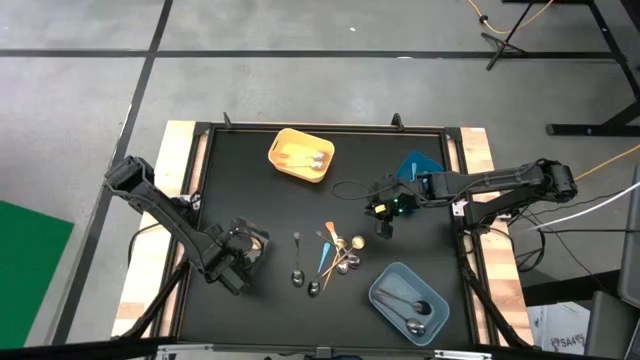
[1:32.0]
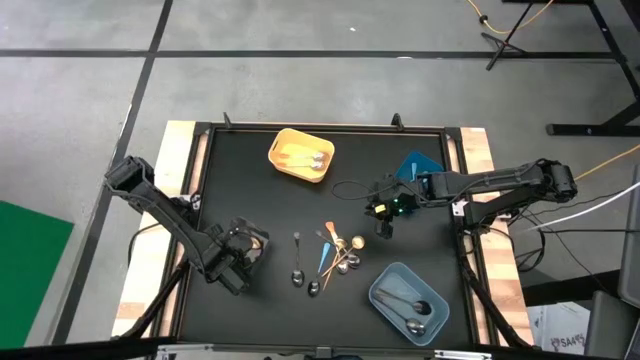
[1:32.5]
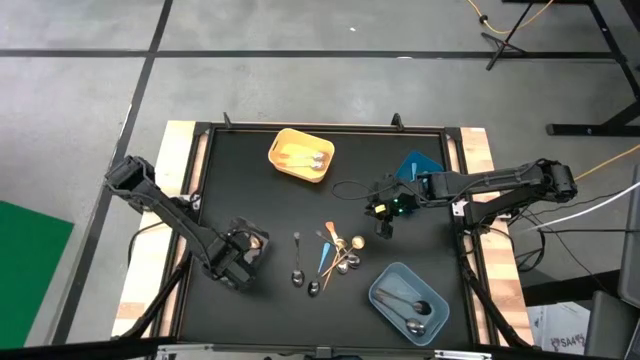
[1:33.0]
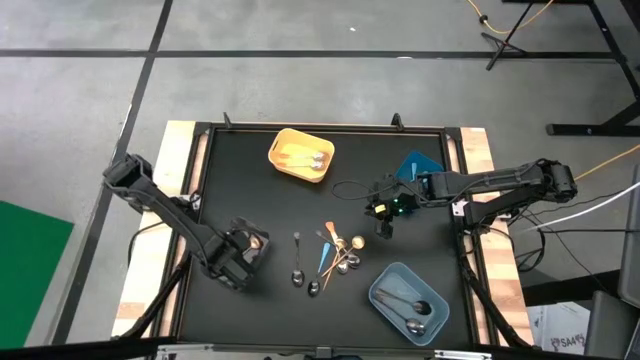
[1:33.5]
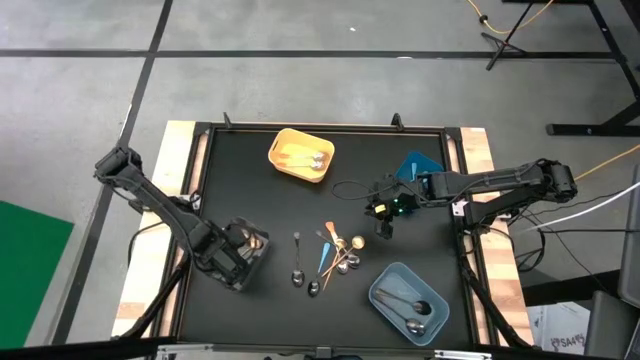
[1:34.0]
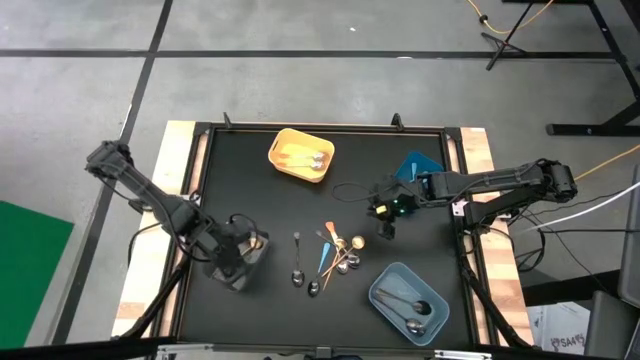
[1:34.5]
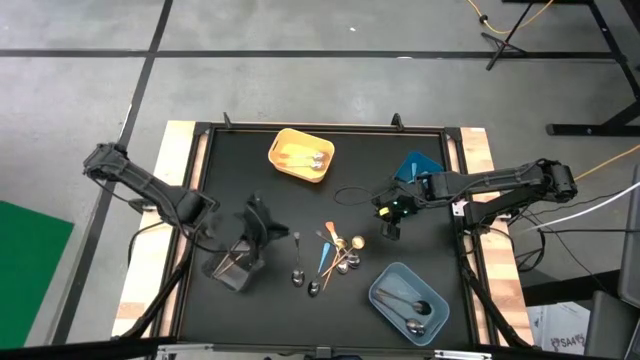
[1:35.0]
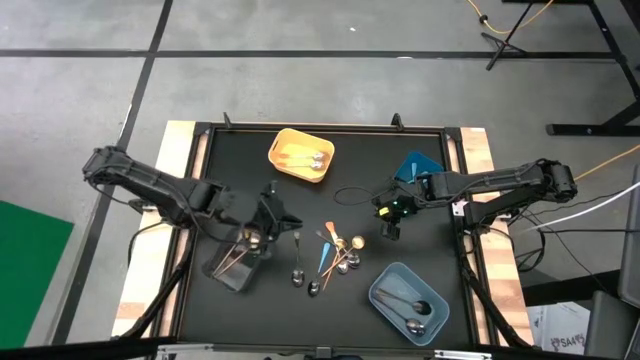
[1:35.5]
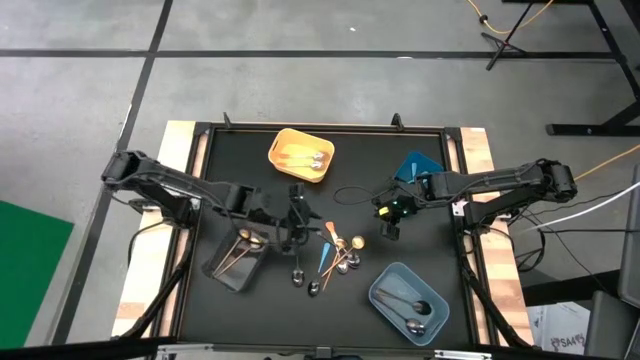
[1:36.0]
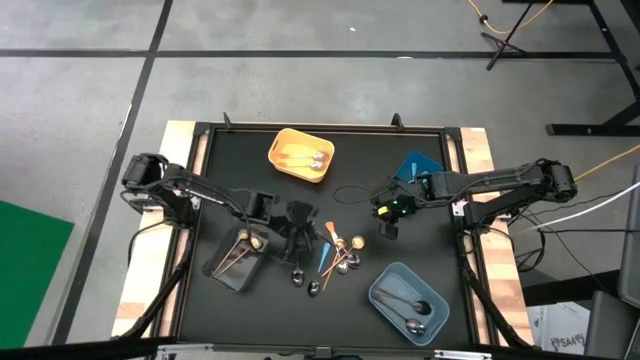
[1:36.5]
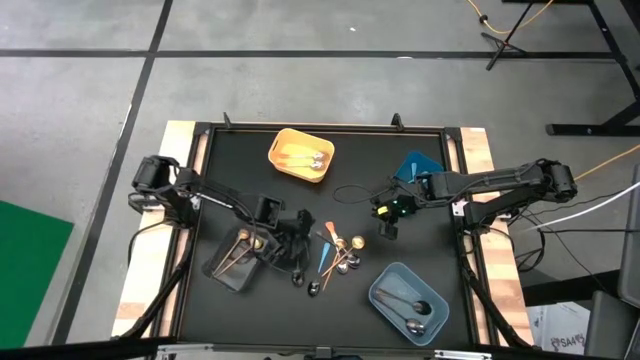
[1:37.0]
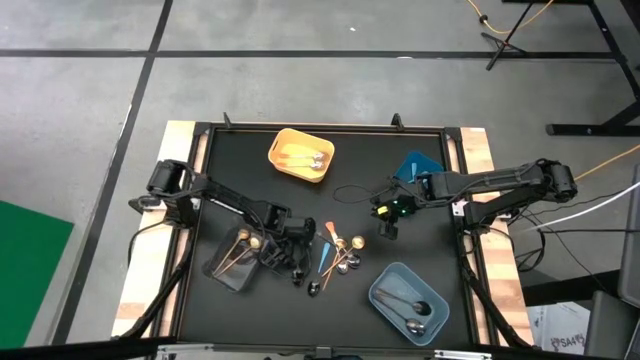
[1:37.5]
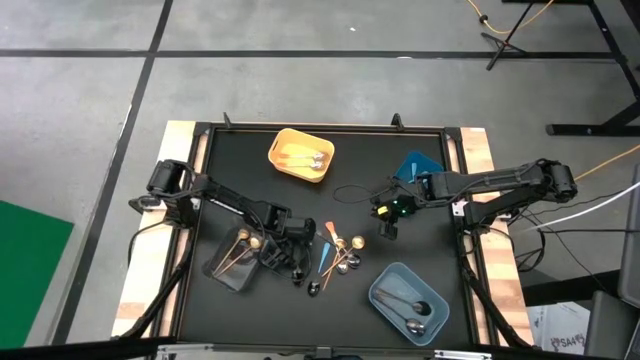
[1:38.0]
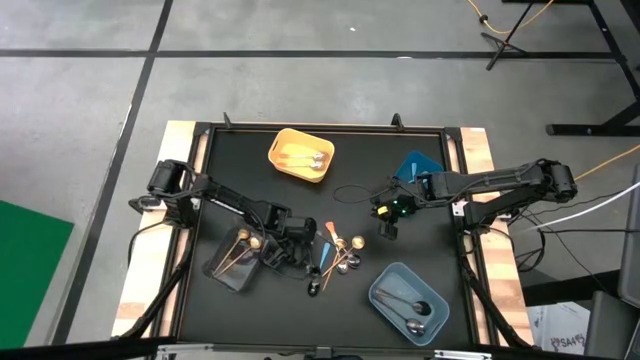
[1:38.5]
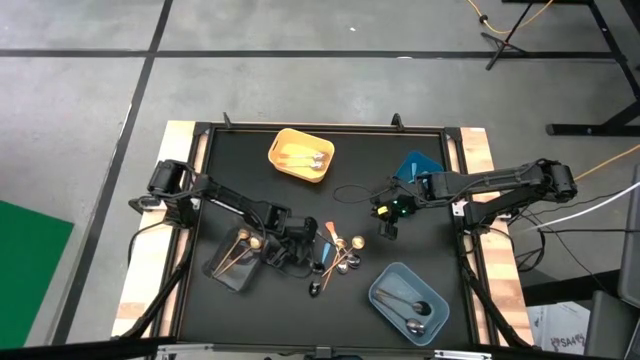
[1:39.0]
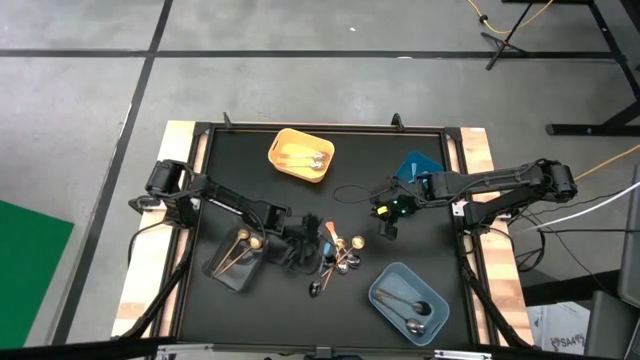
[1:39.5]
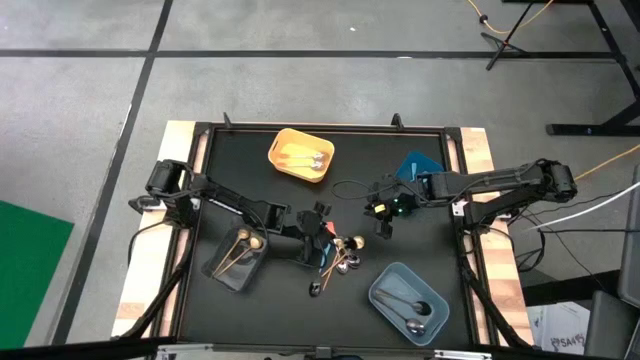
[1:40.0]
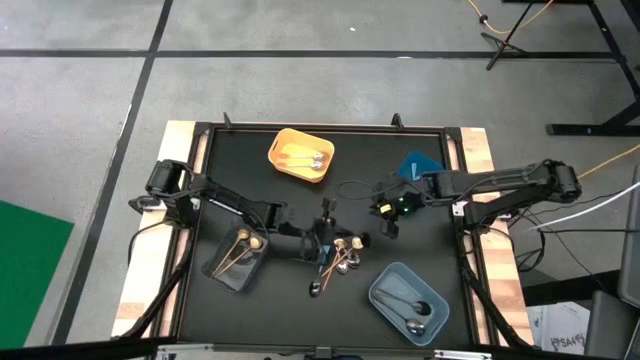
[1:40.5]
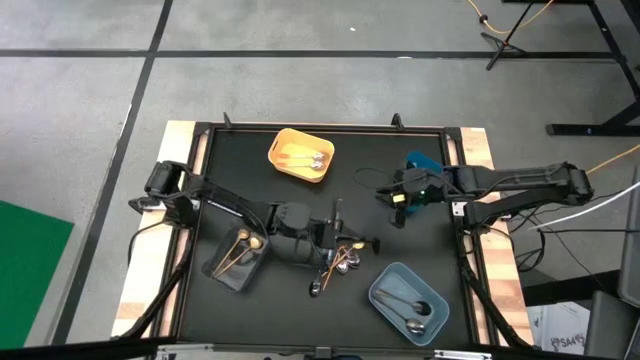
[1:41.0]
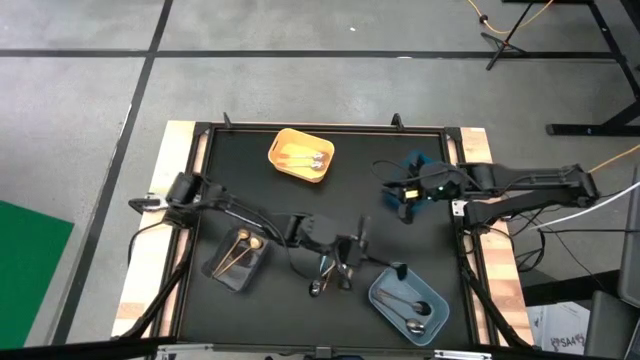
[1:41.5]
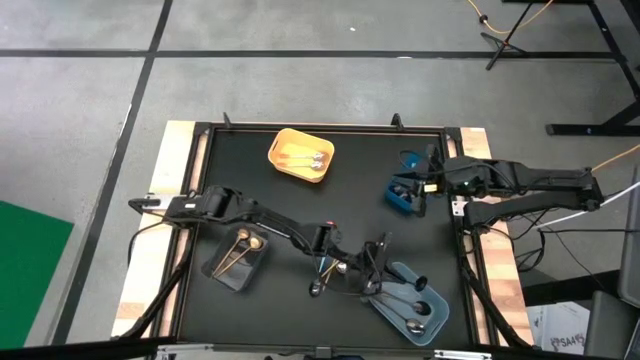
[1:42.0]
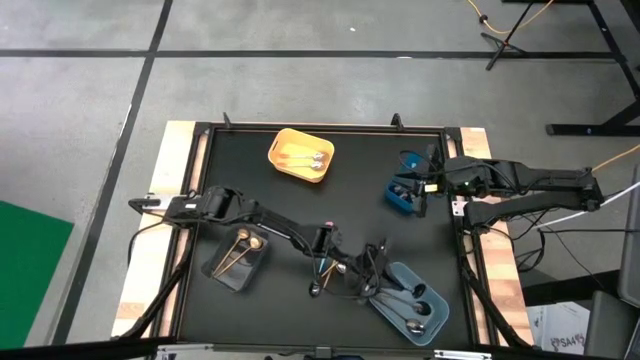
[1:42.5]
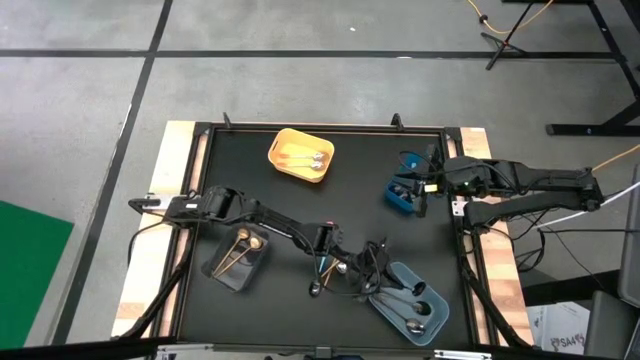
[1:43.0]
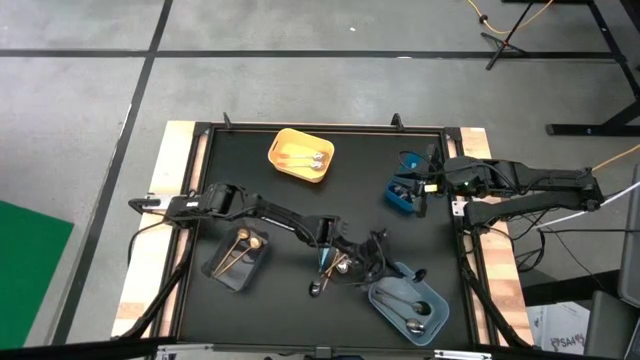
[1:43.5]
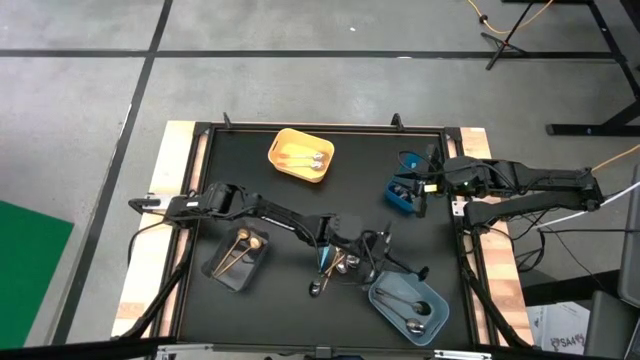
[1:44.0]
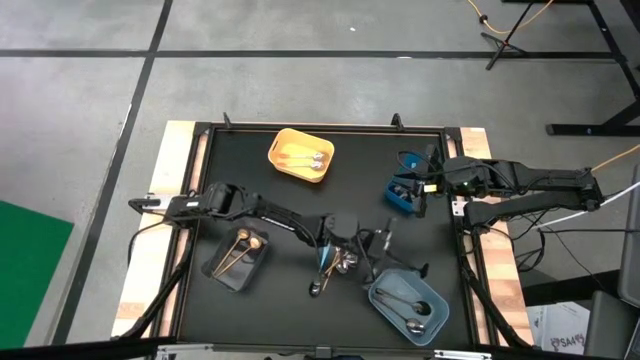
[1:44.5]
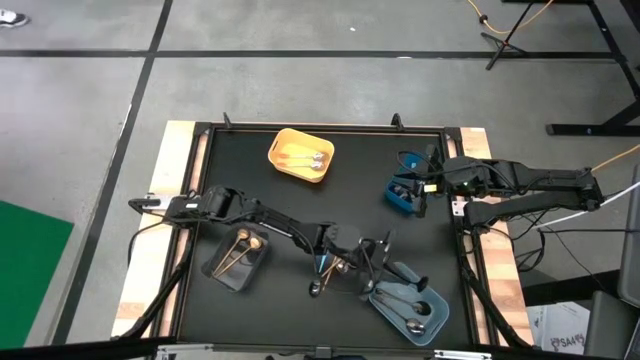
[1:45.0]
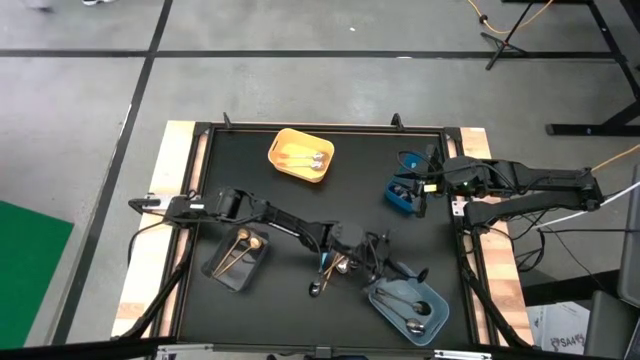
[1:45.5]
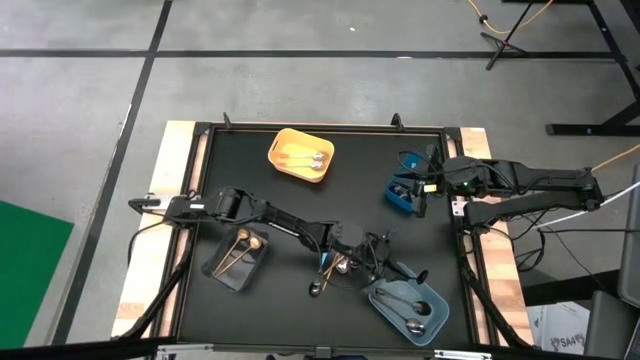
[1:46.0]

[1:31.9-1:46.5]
Task: Sort silverware by color (type)
Put the black spoon into the light blue bin

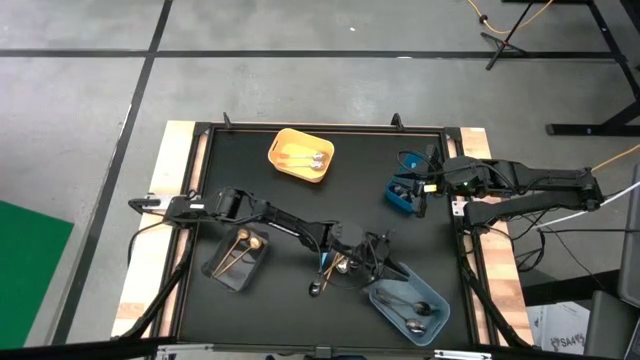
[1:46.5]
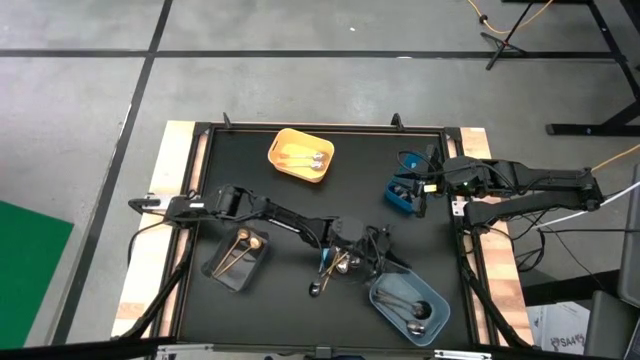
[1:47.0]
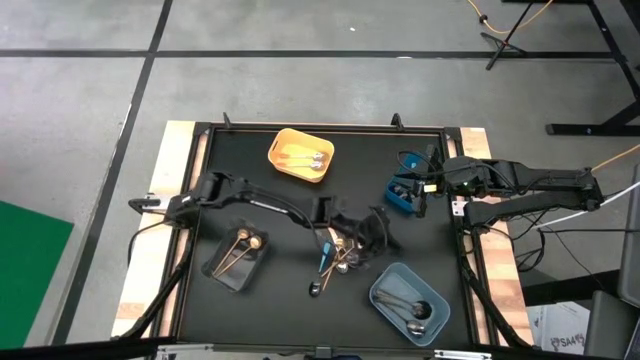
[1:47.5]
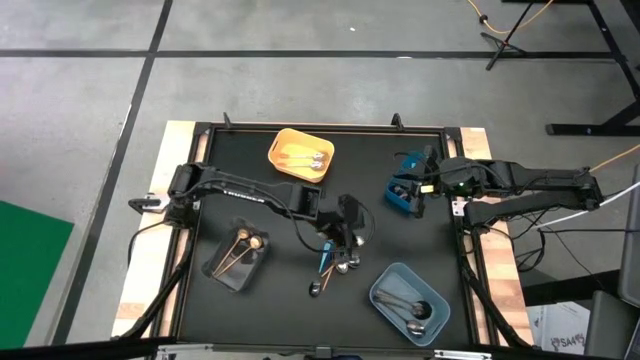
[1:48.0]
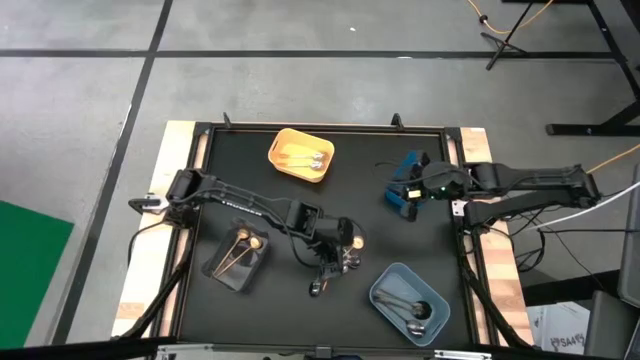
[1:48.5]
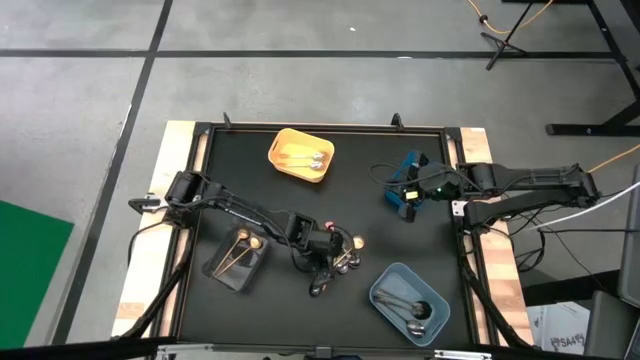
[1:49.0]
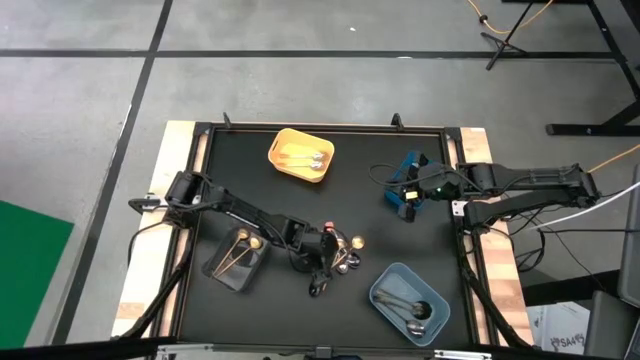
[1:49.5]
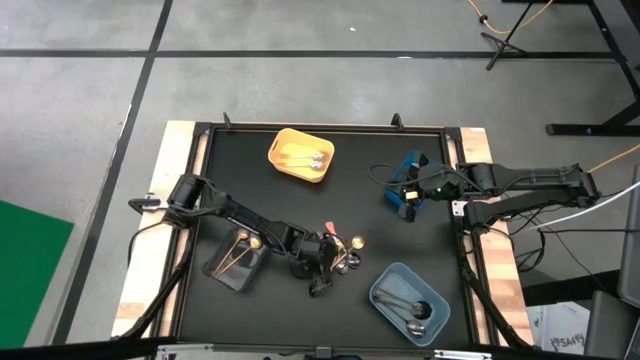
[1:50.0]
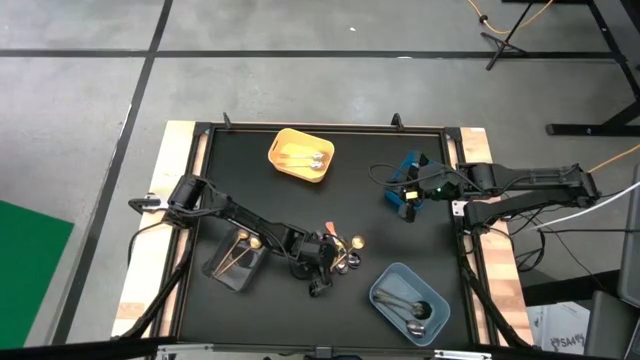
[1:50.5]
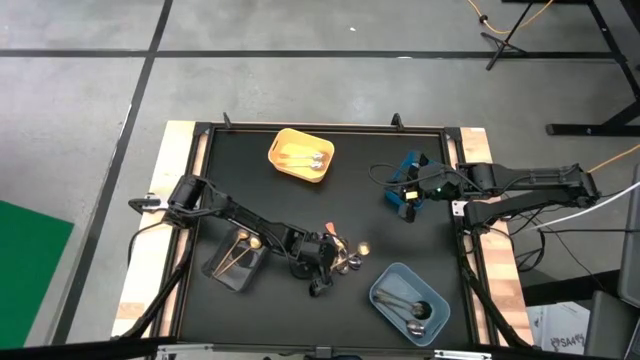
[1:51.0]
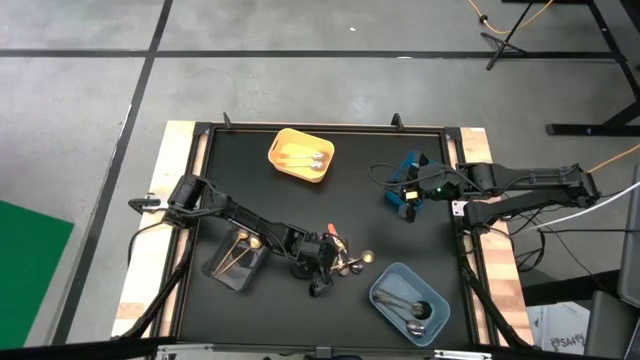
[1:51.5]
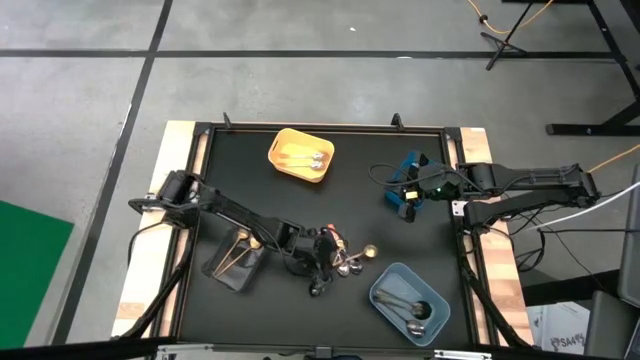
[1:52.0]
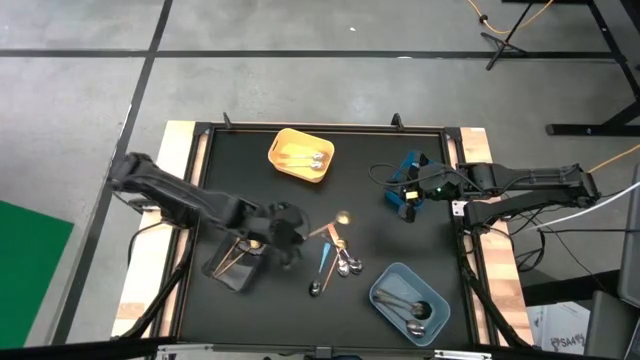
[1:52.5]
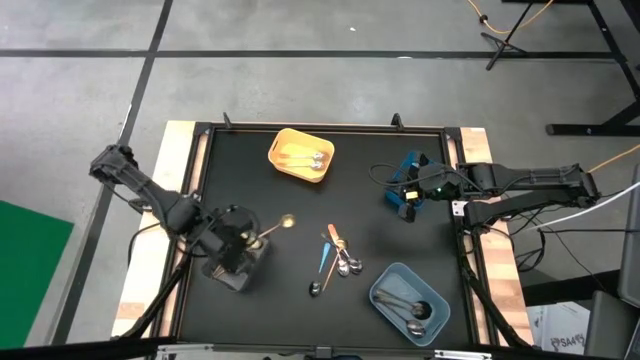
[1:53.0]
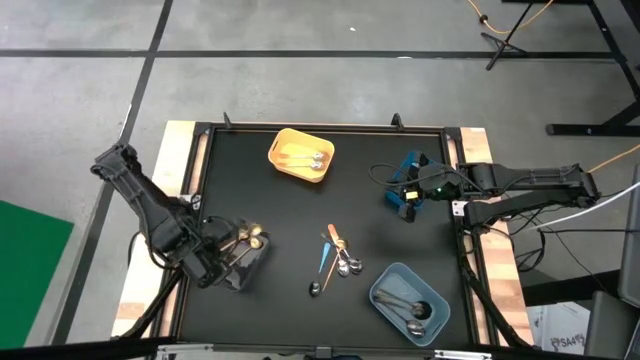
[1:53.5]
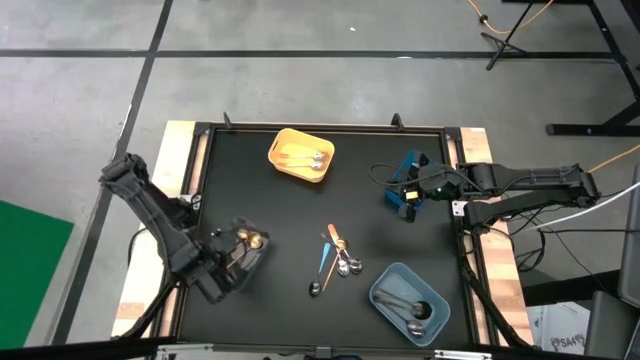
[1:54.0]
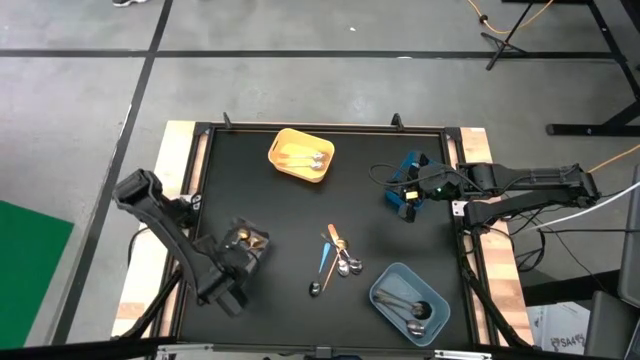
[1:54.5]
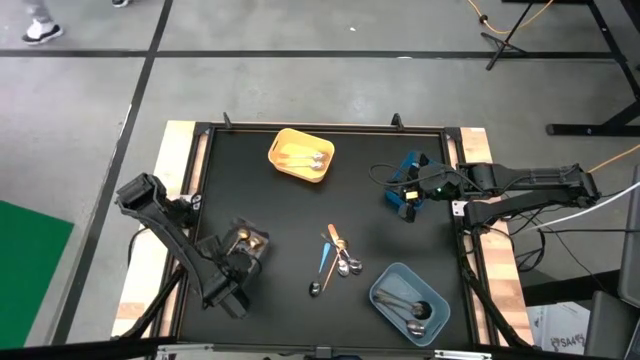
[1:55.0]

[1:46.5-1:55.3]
Put the gold spoon into the black bin
